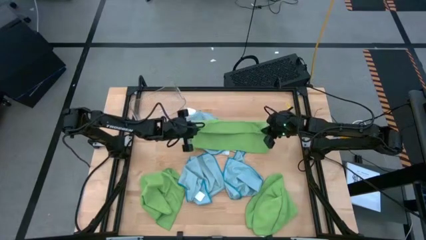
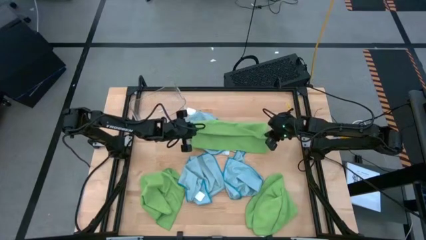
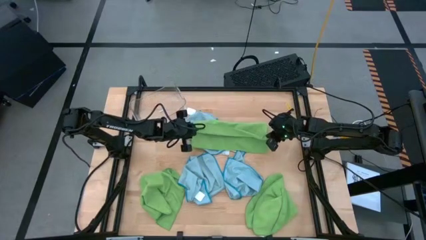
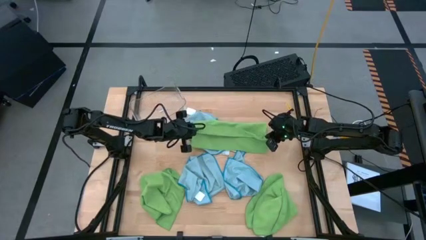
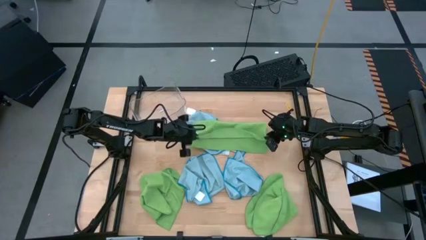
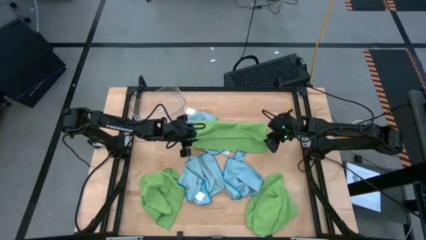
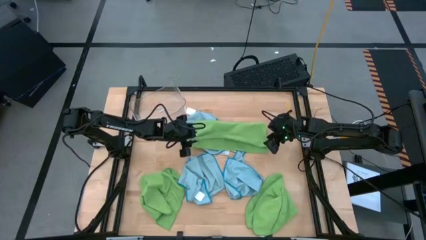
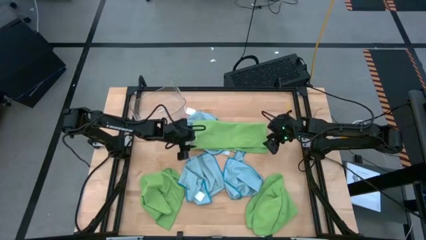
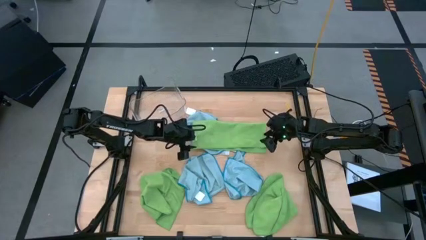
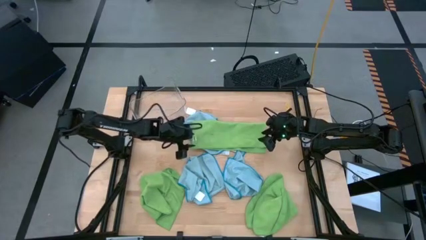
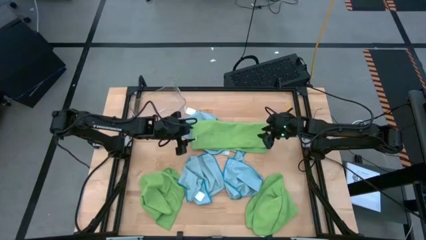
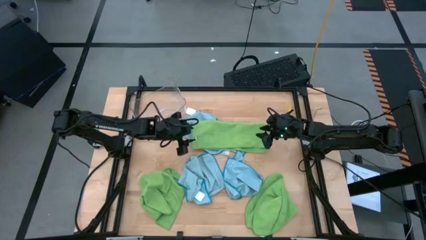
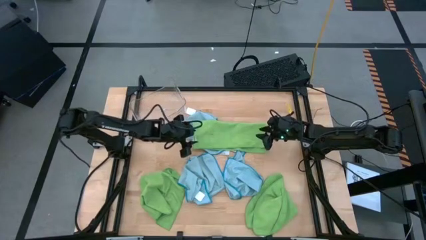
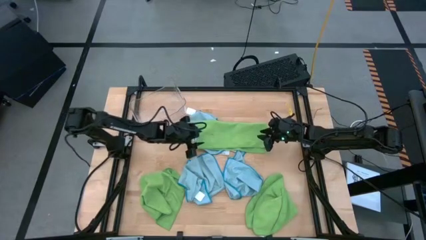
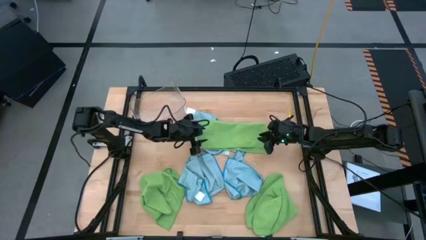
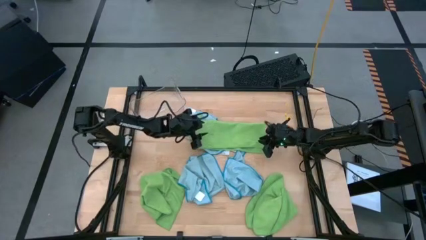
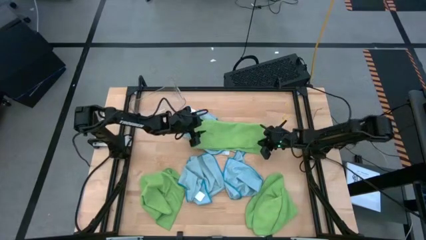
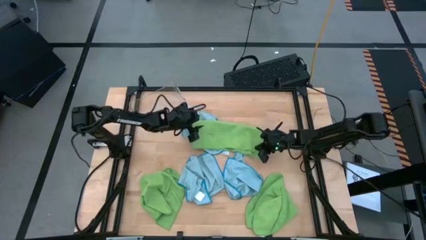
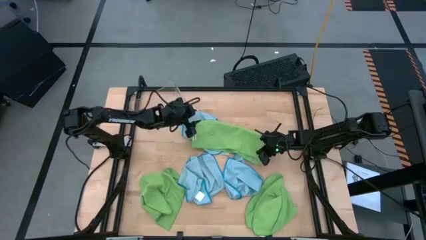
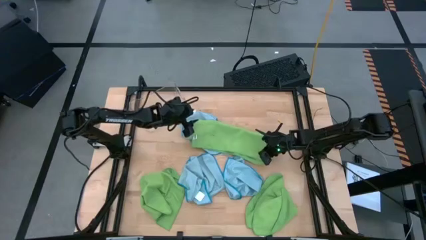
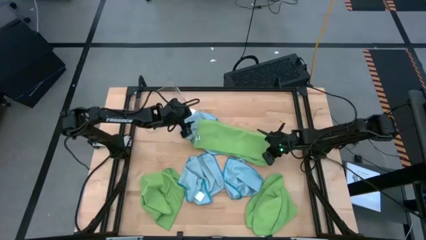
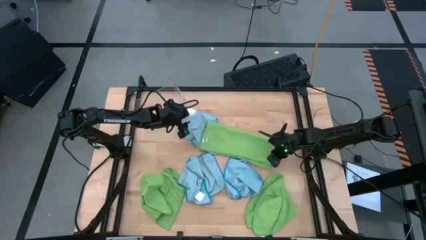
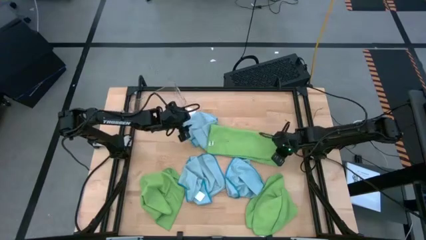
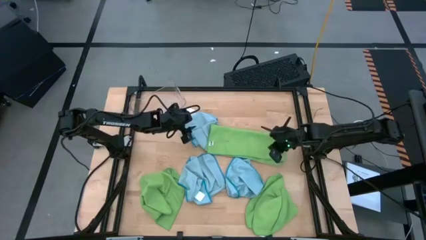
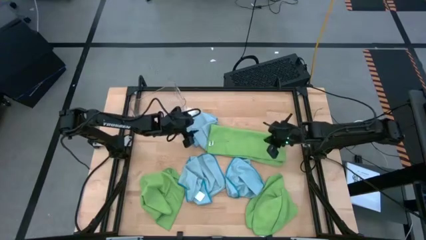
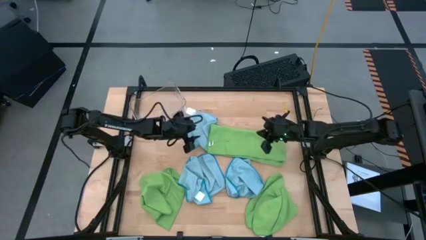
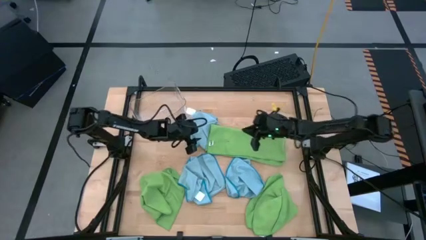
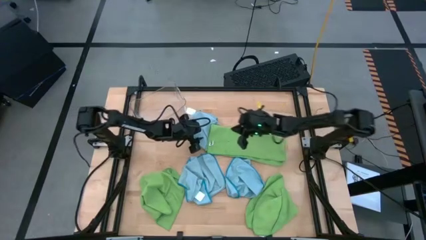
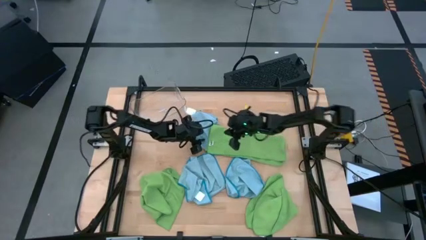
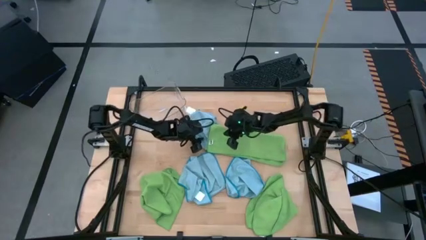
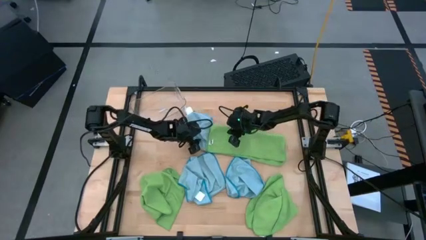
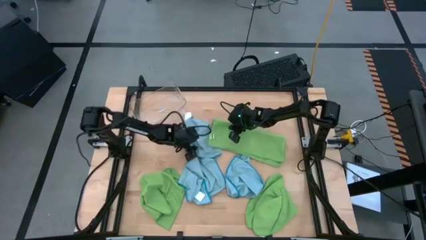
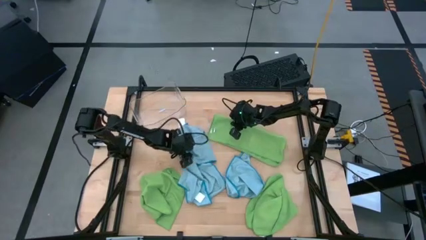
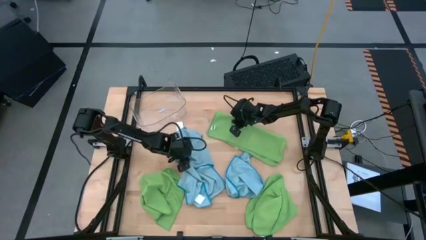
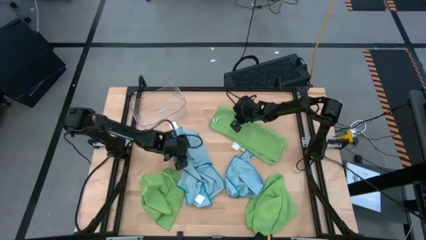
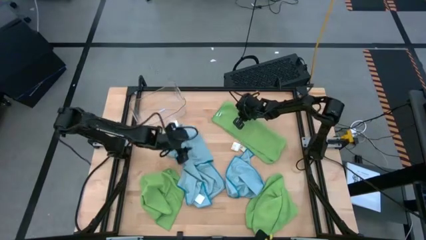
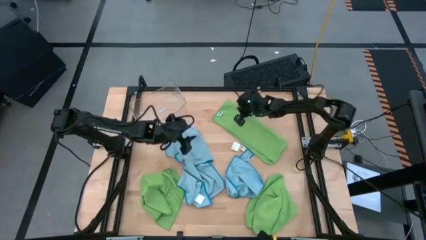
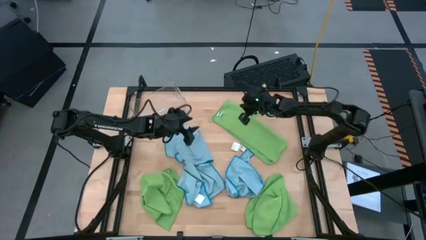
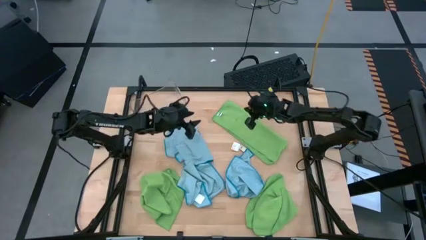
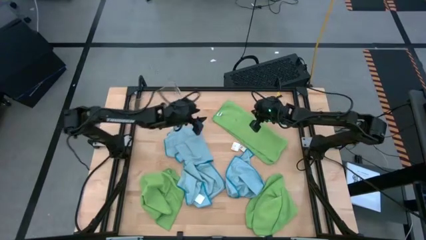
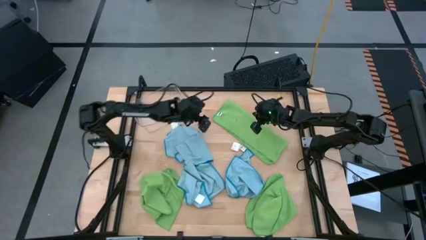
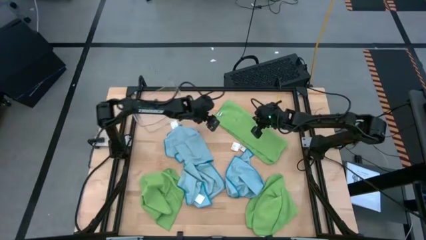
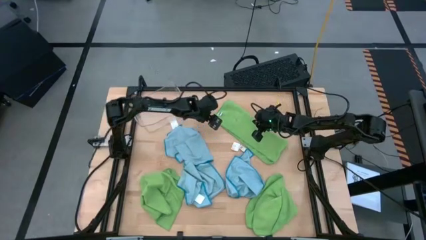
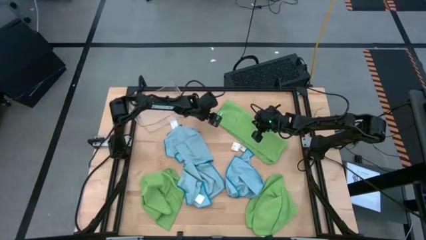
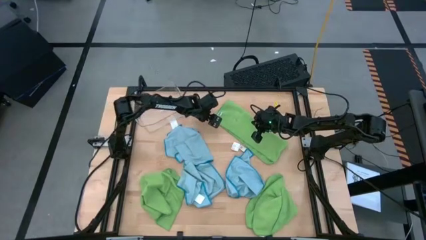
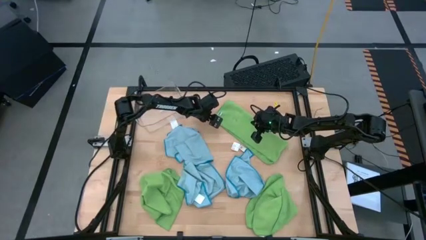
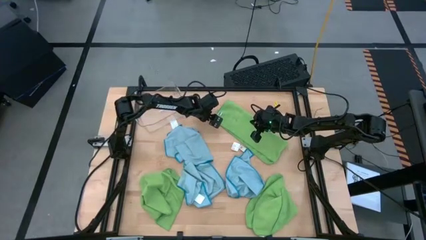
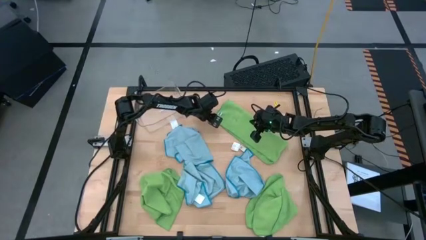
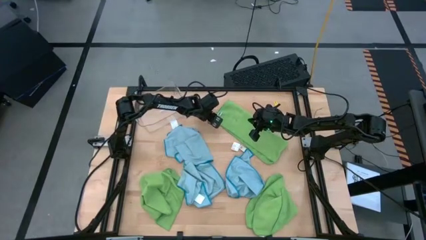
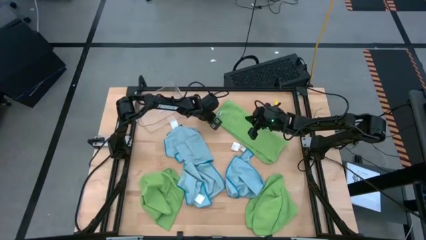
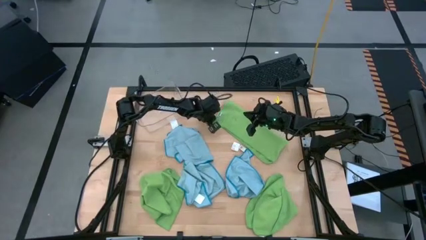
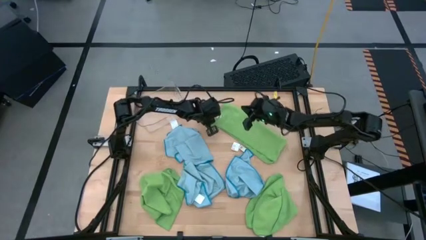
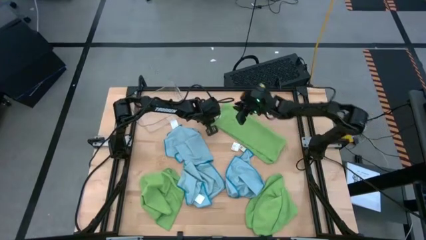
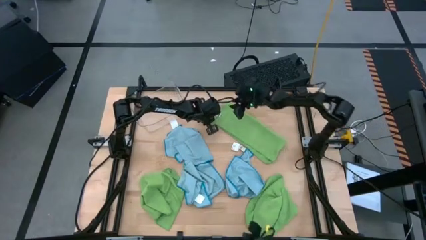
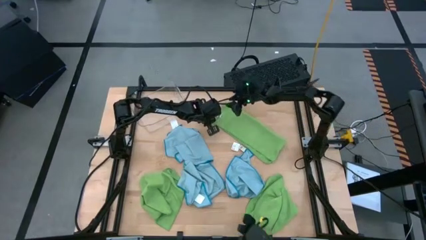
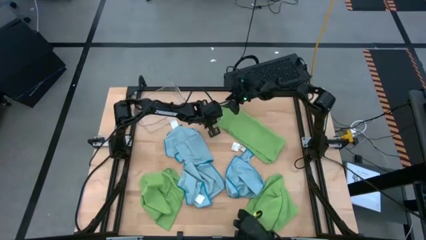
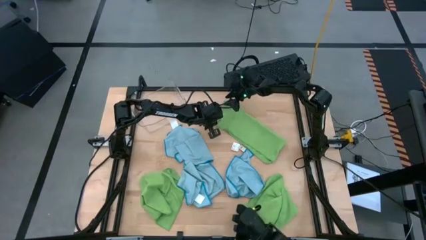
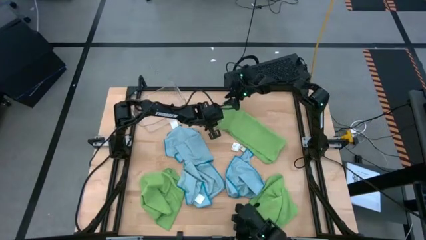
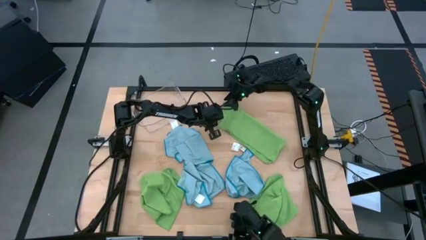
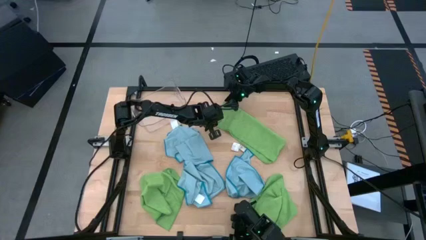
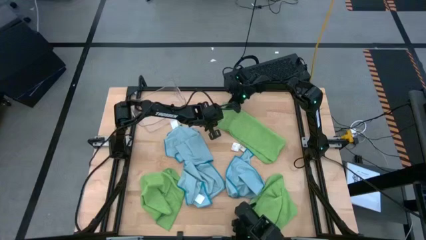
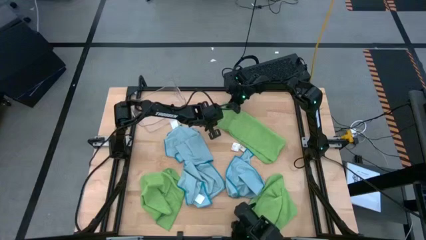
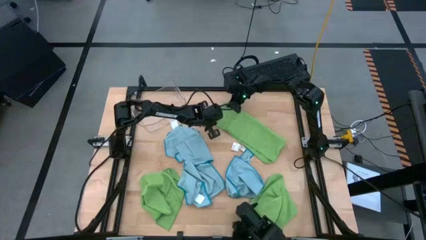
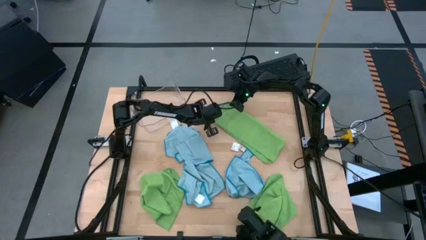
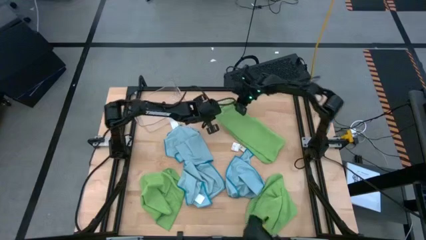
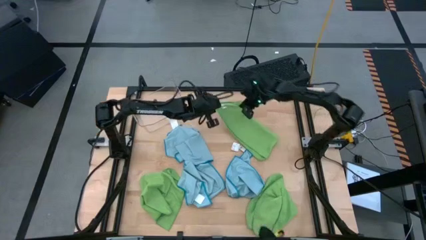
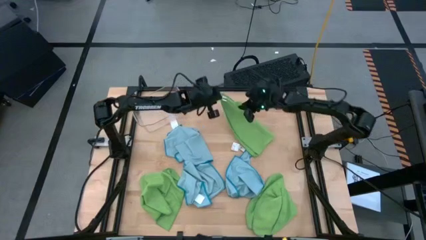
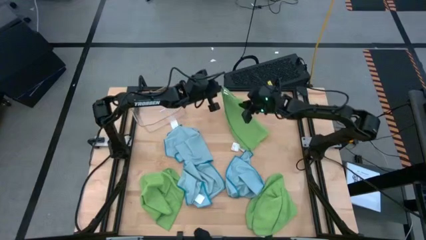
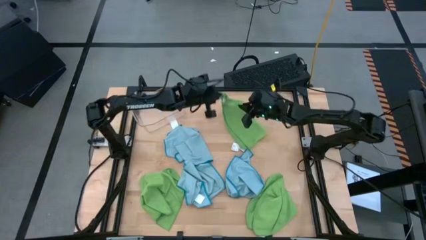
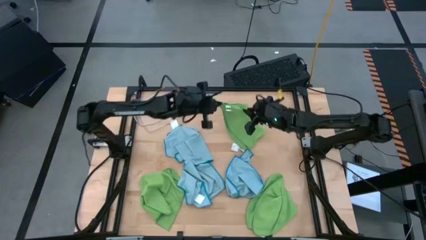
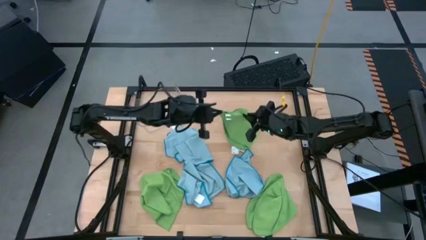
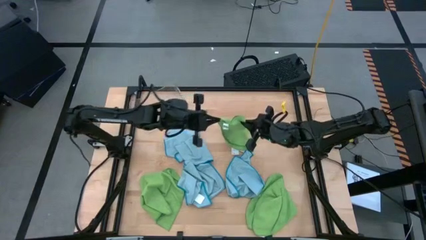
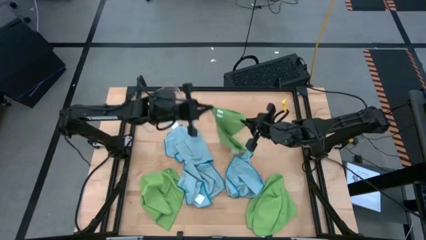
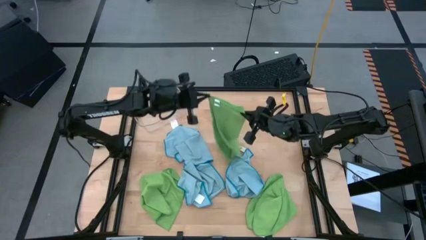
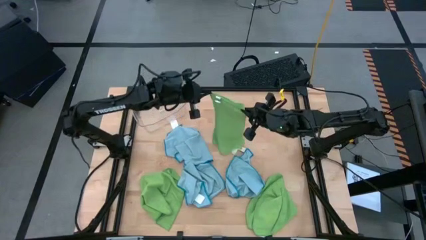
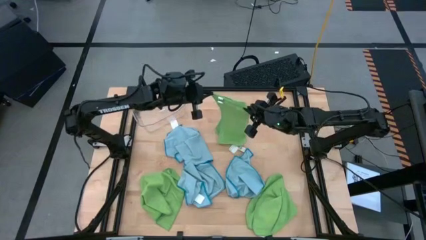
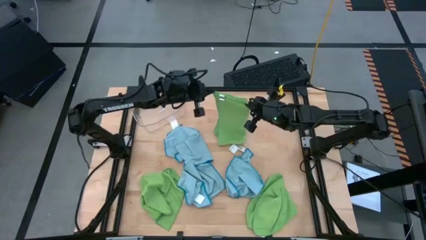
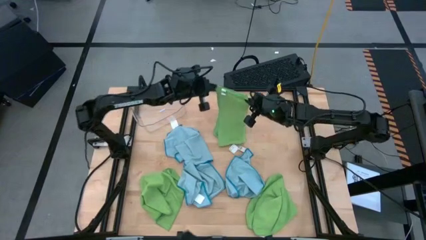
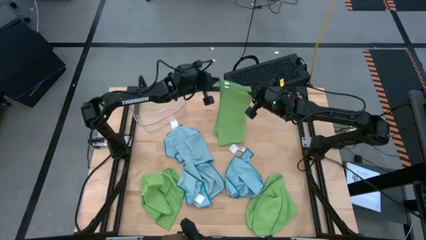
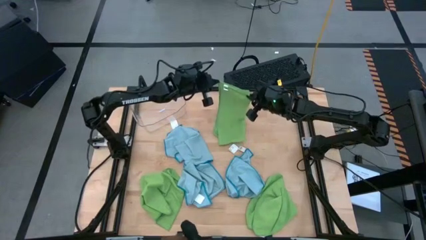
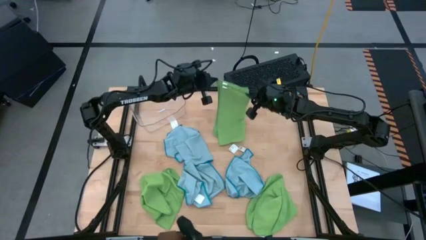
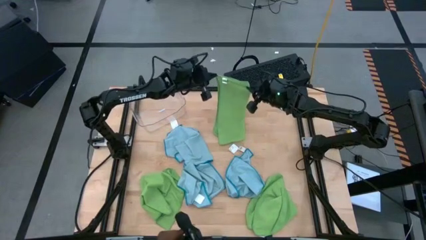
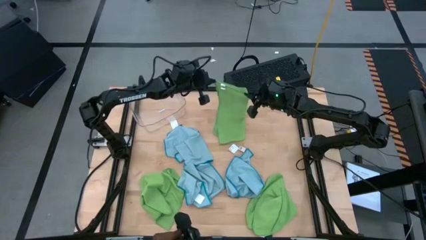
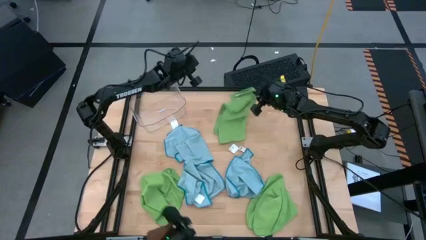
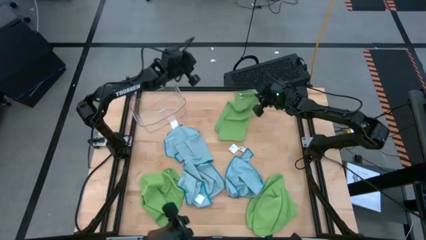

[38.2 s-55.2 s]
Task: Fold microfiber towels
Fold the top right green microfiber cloth
